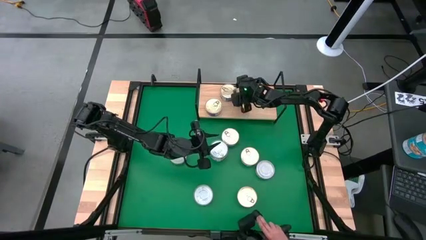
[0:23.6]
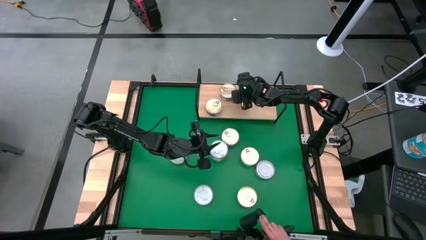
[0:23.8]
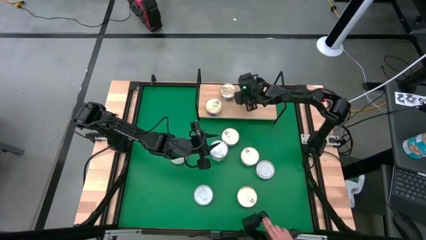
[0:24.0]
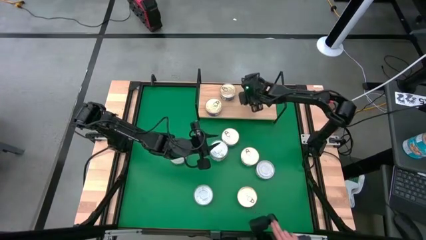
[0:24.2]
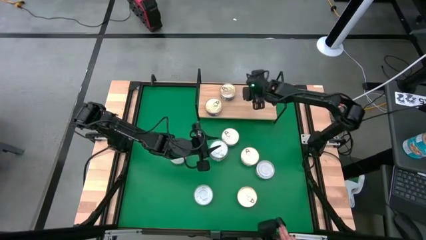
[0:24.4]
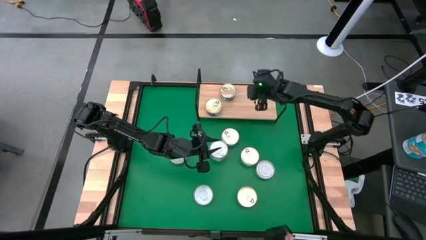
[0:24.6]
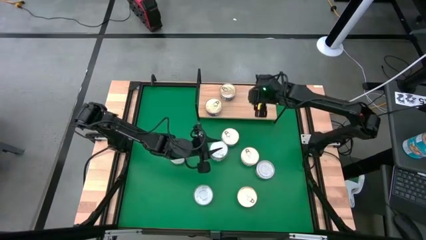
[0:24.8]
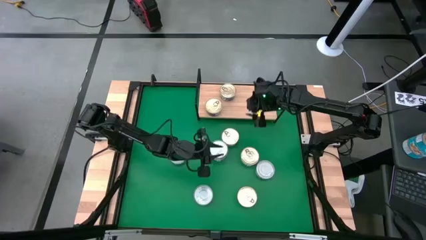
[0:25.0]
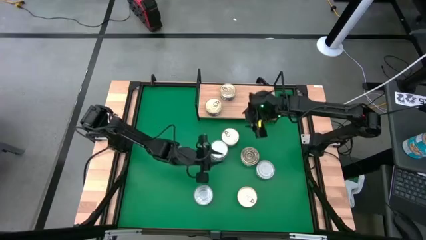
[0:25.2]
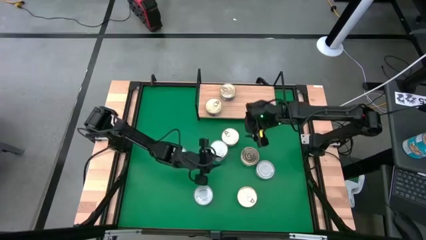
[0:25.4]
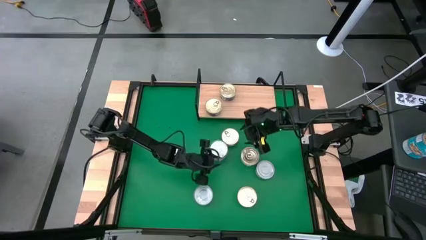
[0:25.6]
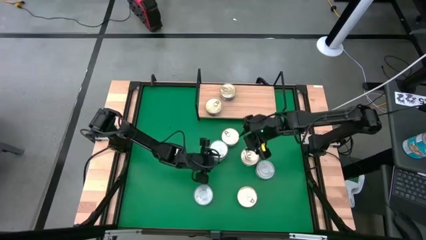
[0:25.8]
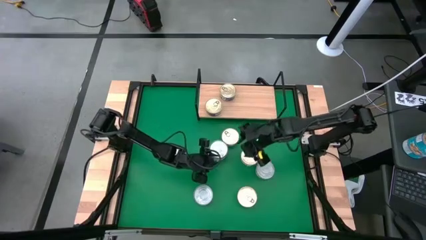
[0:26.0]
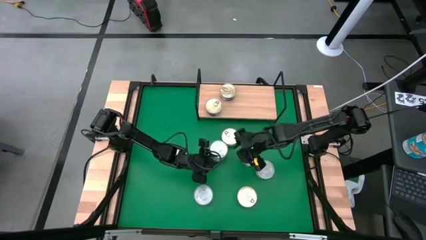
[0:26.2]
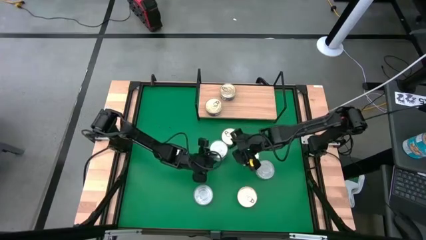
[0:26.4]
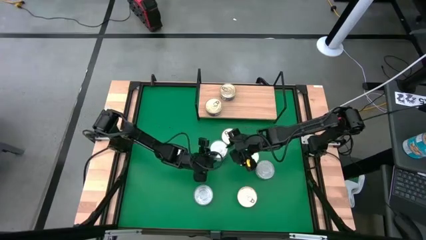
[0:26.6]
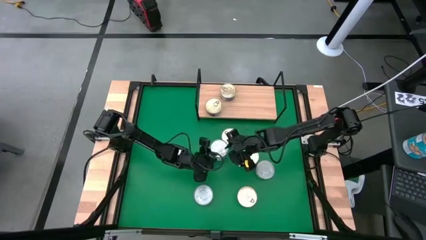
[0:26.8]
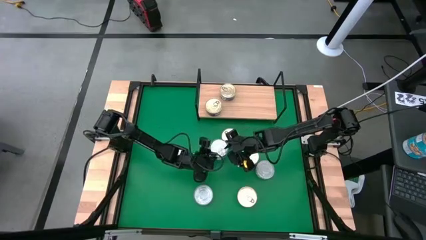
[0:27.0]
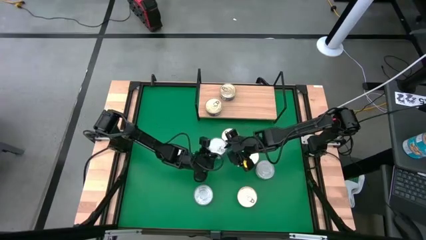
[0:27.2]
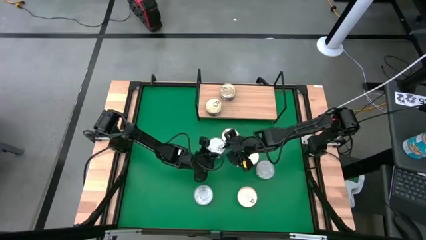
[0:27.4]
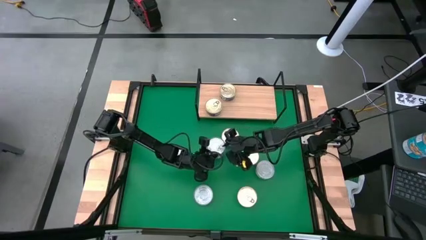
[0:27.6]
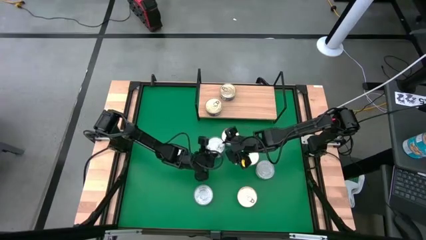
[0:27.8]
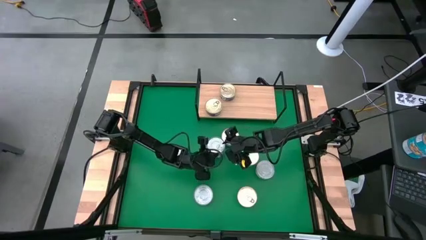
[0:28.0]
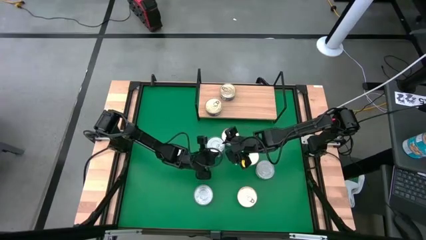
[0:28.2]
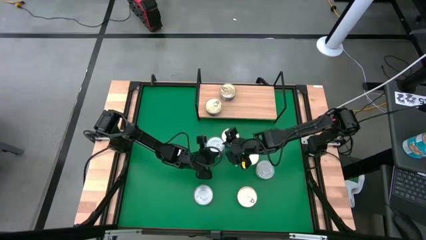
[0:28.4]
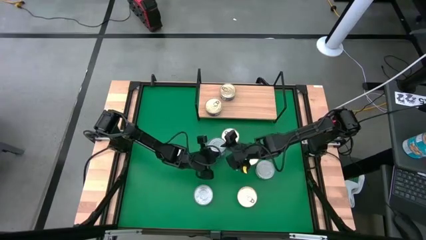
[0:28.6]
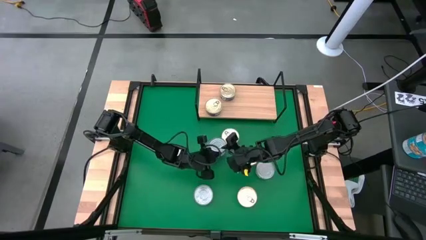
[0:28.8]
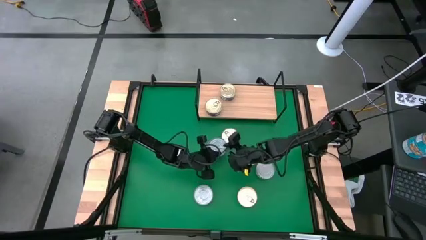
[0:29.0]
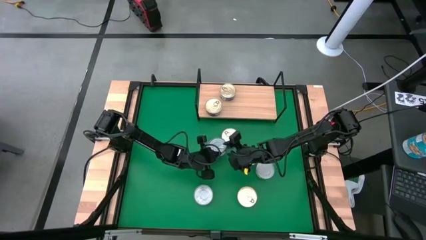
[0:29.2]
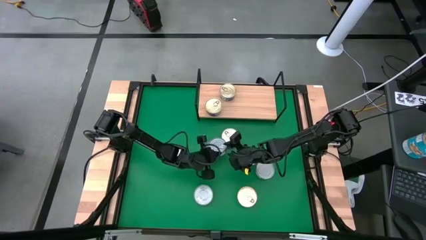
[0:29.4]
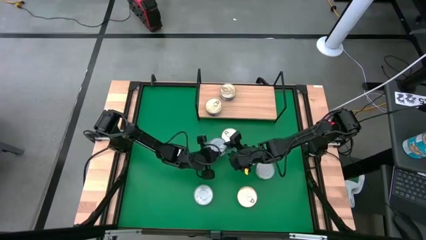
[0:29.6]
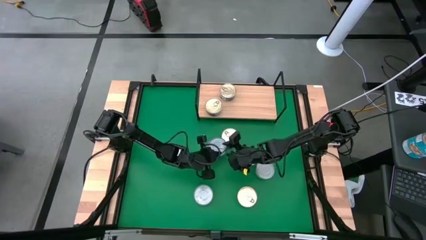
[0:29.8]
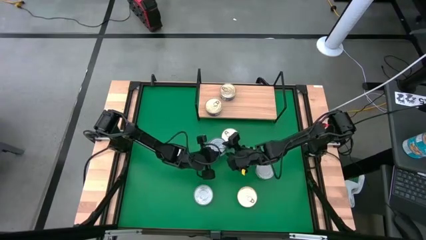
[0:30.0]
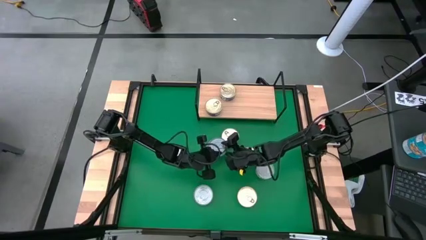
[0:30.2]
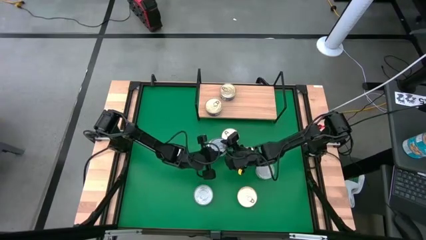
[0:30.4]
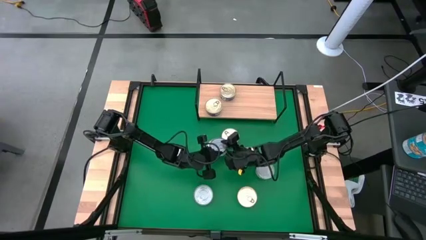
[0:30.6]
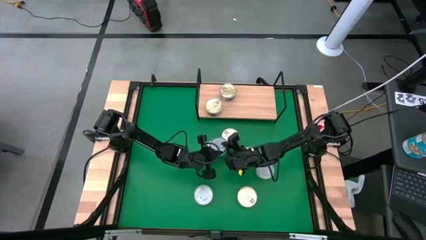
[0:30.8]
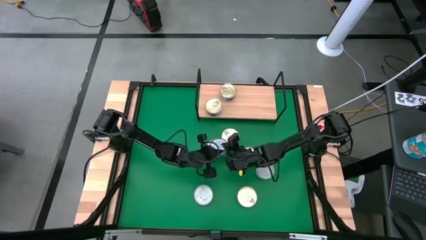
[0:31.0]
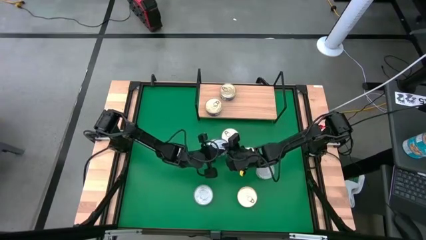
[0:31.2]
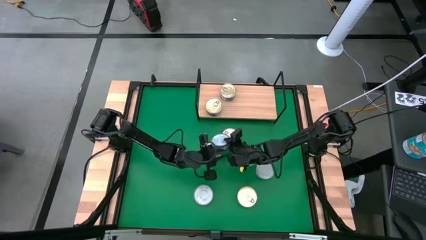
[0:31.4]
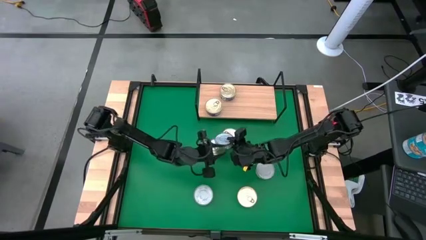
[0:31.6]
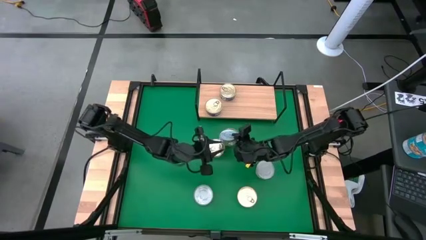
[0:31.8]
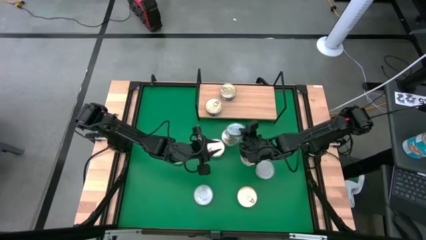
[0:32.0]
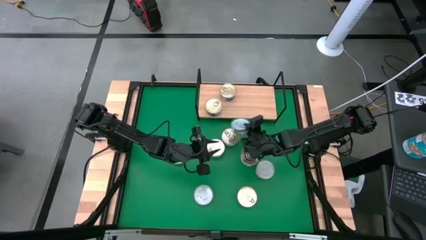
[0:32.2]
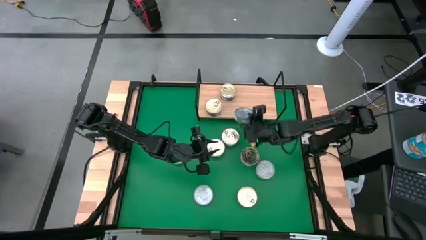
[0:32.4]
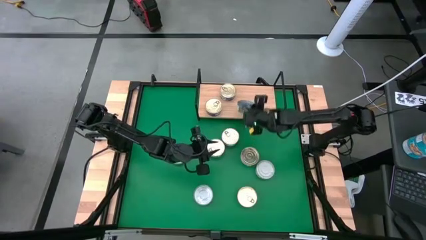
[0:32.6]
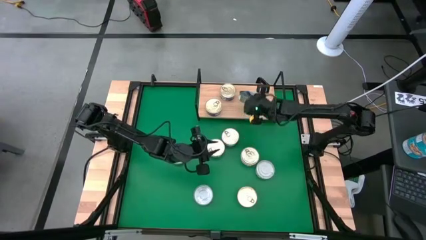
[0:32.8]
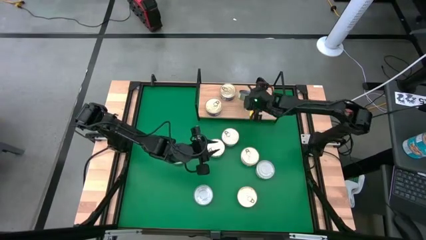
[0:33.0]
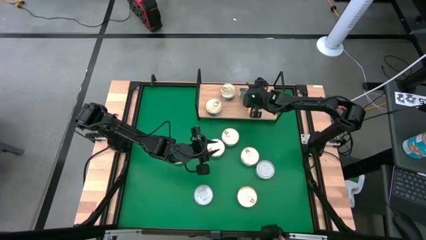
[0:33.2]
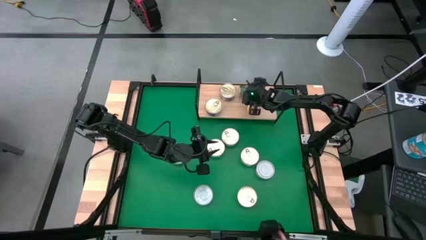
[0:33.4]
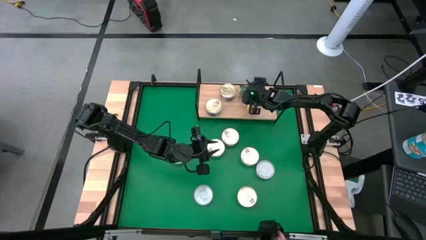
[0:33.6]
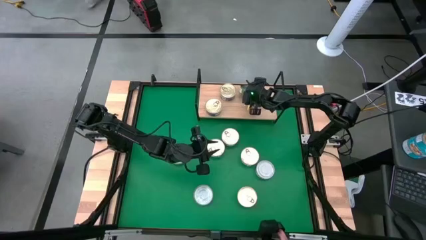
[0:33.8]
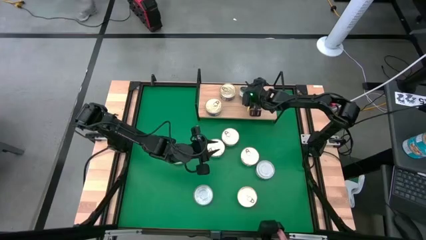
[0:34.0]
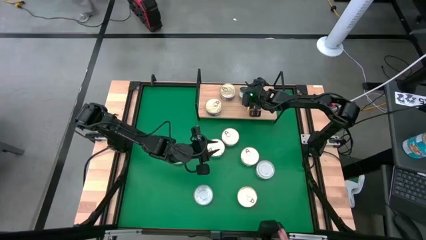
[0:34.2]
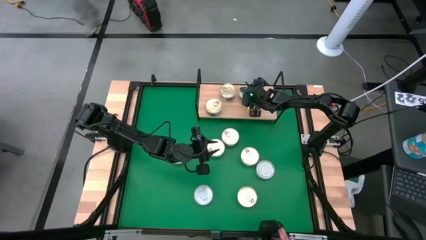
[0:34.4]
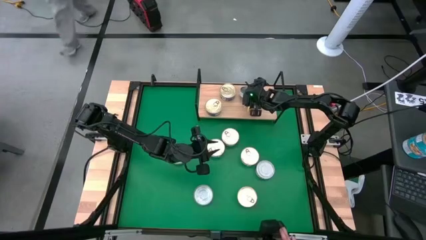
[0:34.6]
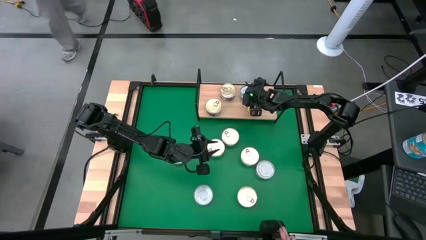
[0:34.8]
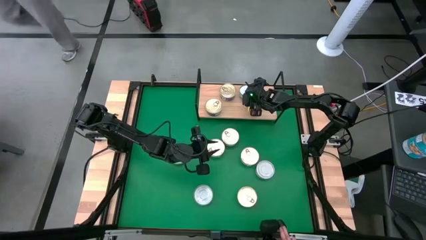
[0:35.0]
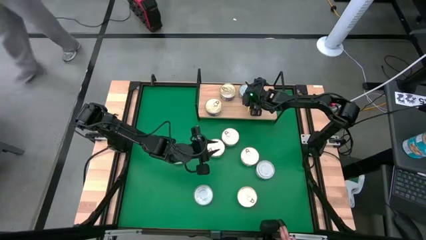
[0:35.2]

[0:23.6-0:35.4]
Task: Stack canned seafood by type on shelf
Put the green tuna can on the shelf aligned with the blue tuna can
